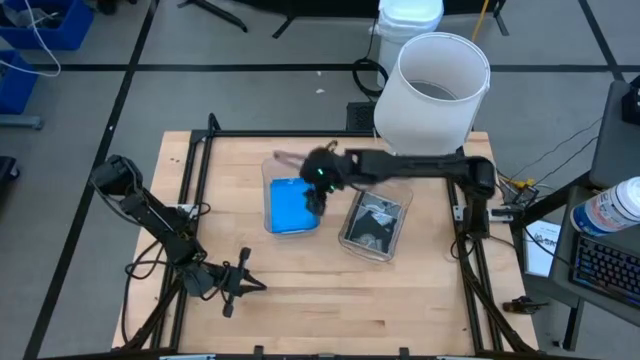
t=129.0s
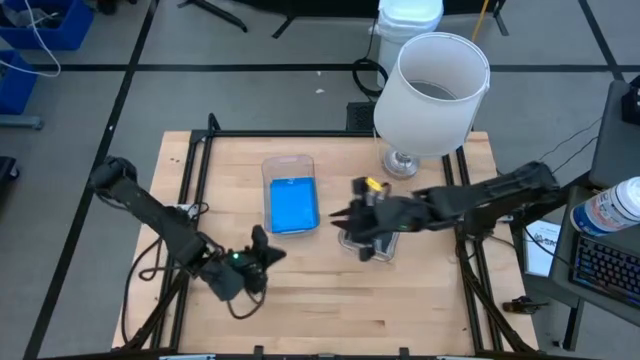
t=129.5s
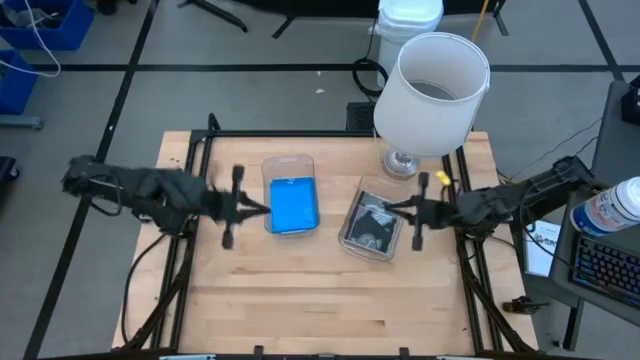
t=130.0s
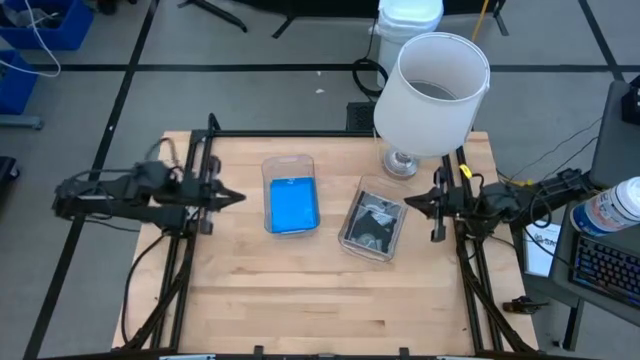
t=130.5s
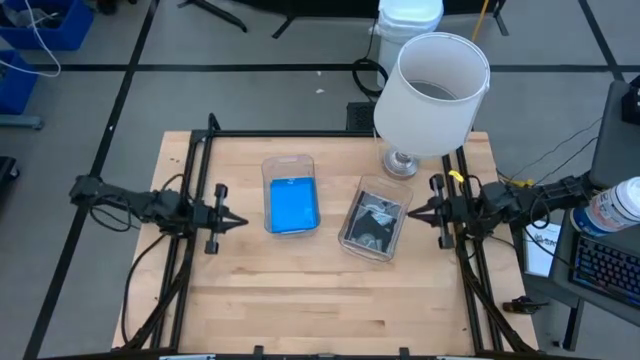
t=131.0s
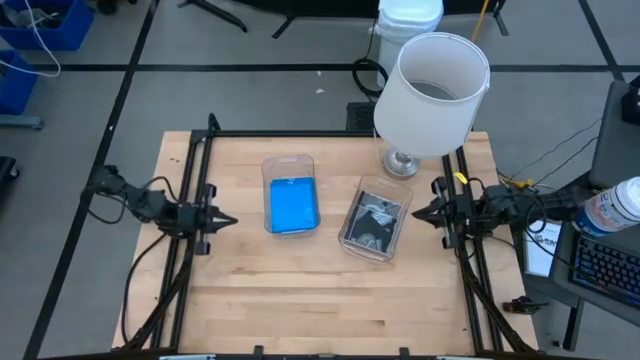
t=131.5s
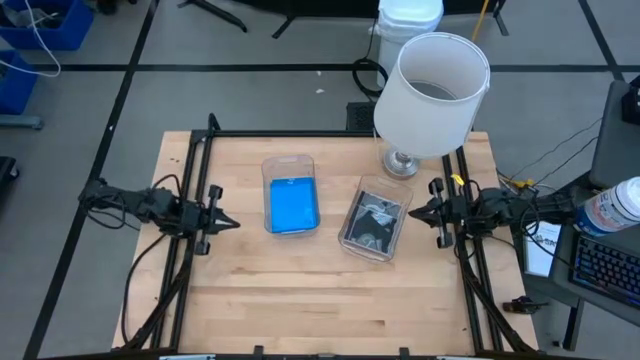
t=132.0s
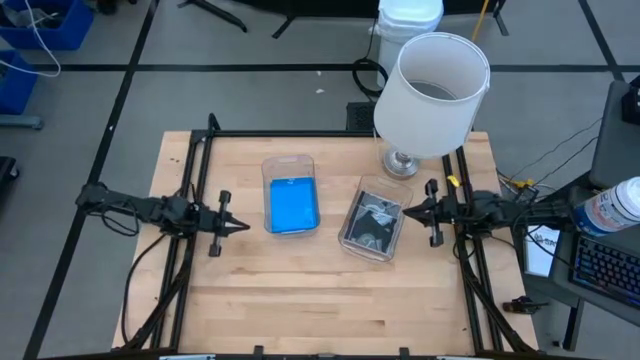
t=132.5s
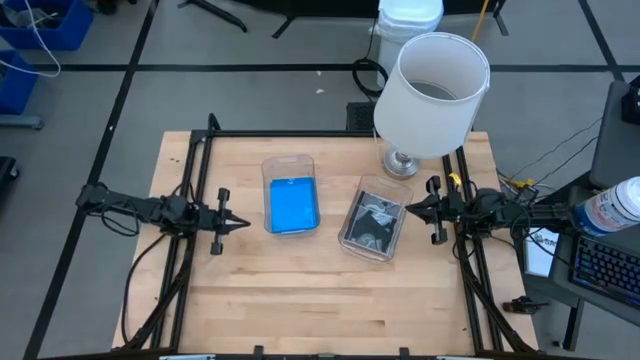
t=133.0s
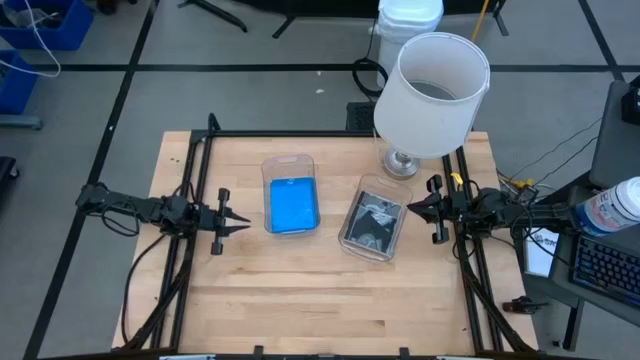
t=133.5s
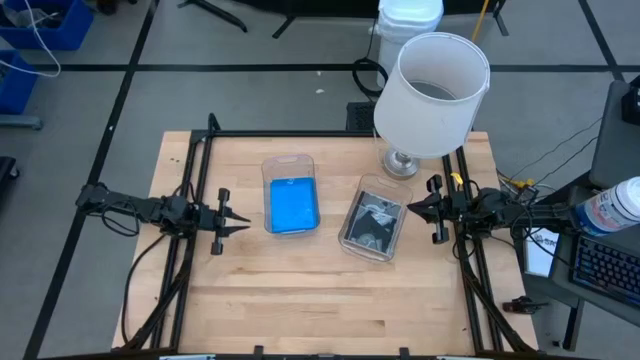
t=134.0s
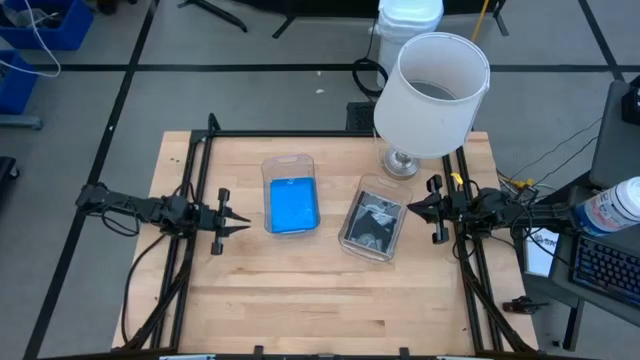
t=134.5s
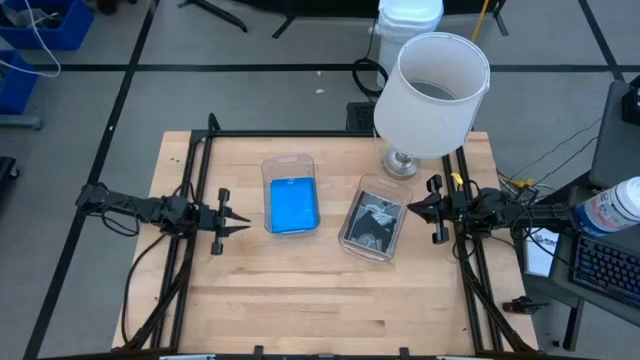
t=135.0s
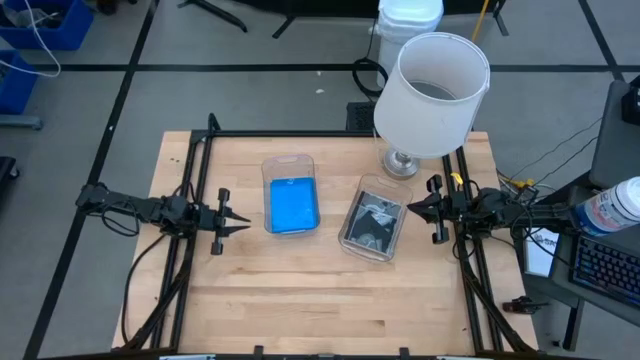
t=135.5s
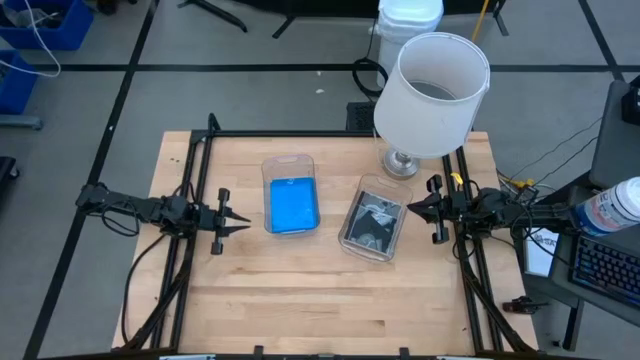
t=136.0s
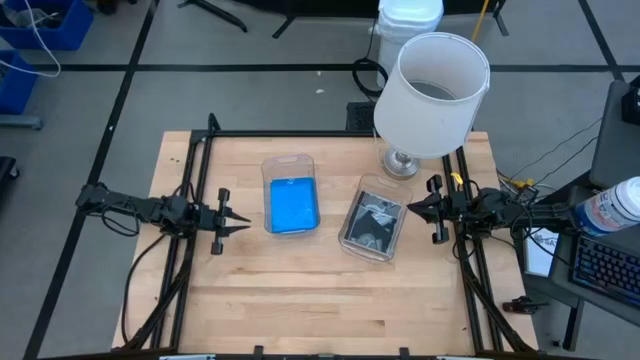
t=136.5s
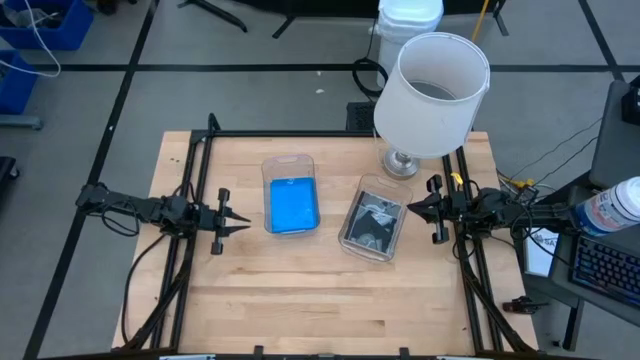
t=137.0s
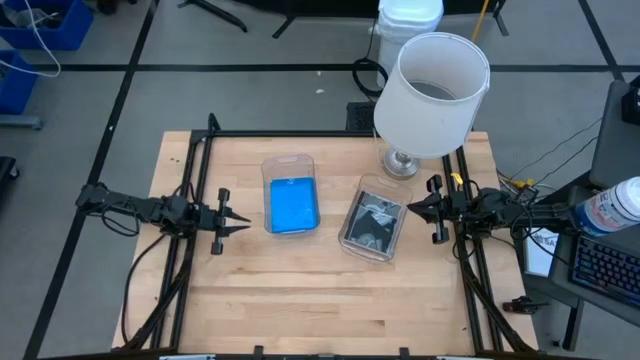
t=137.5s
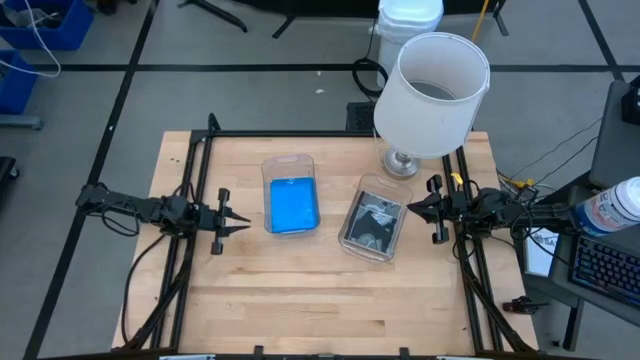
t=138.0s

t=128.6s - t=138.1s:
Task: Pick & place jewel cases by type
Return to Home Position

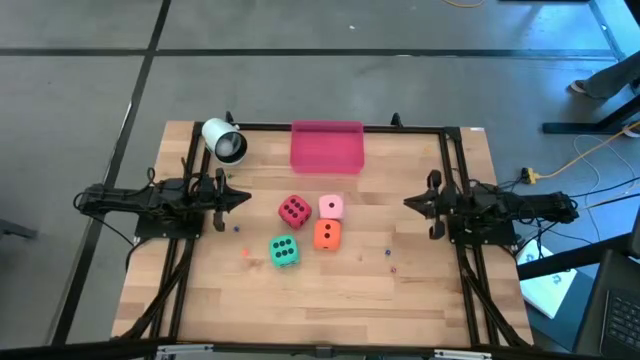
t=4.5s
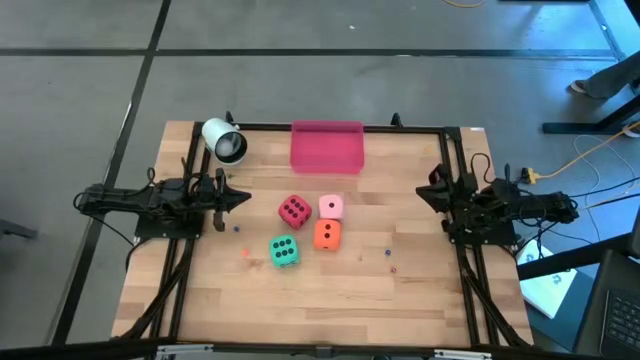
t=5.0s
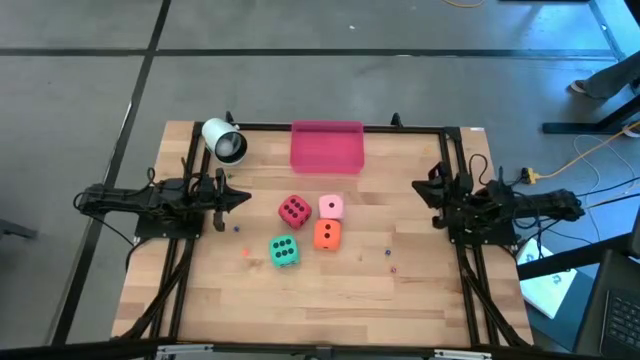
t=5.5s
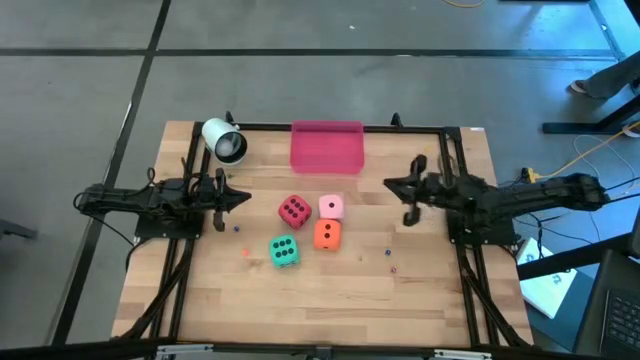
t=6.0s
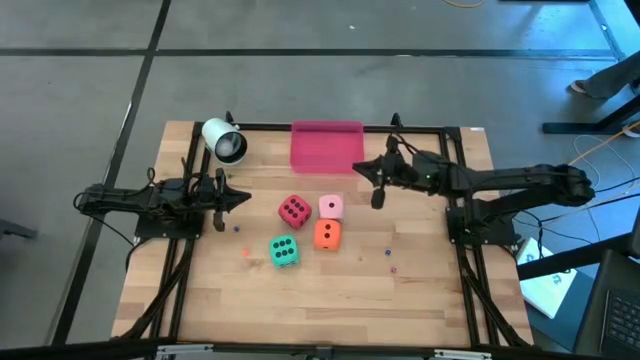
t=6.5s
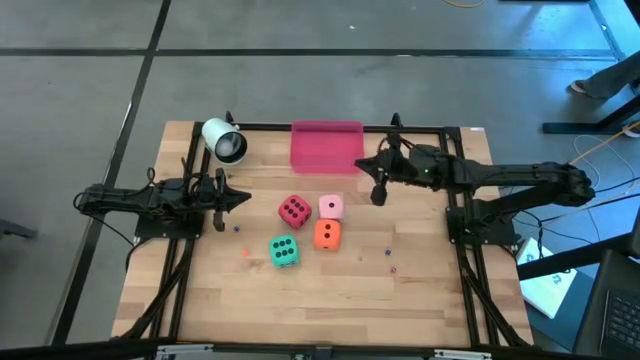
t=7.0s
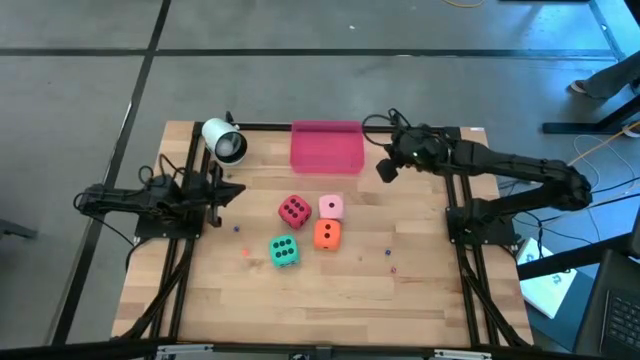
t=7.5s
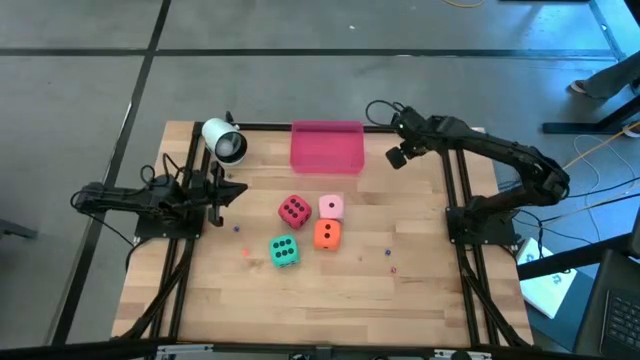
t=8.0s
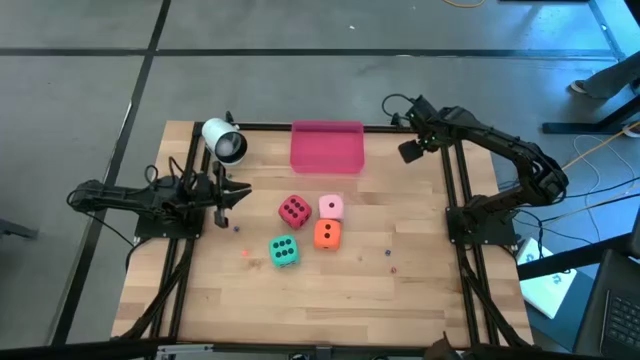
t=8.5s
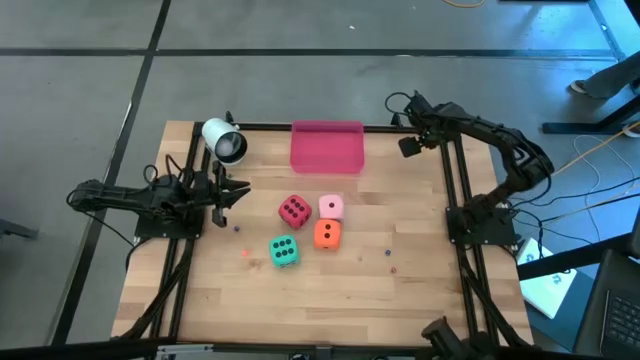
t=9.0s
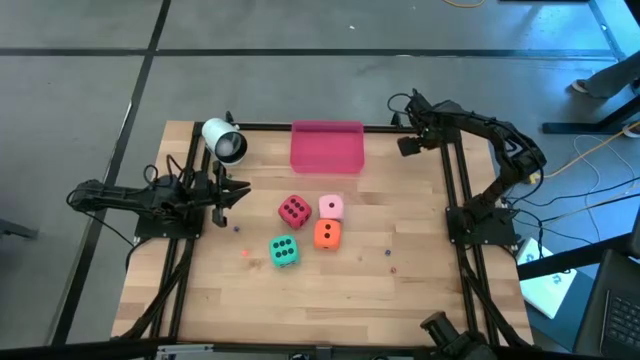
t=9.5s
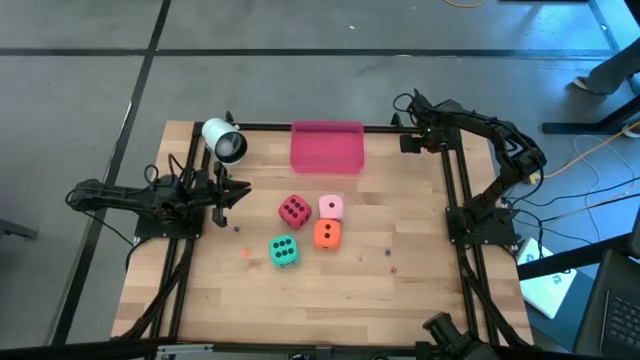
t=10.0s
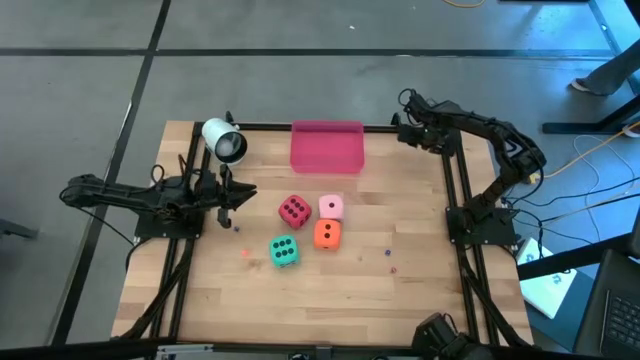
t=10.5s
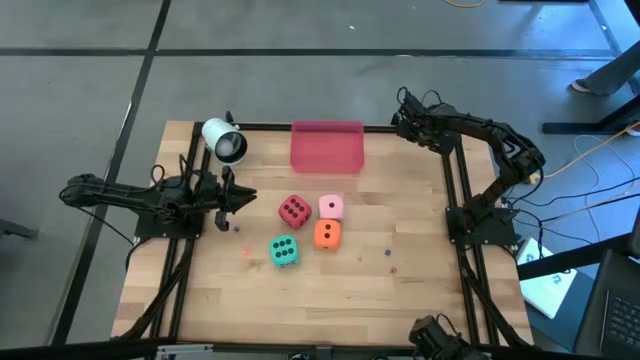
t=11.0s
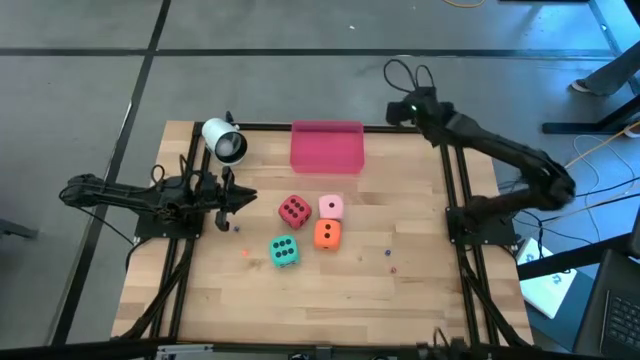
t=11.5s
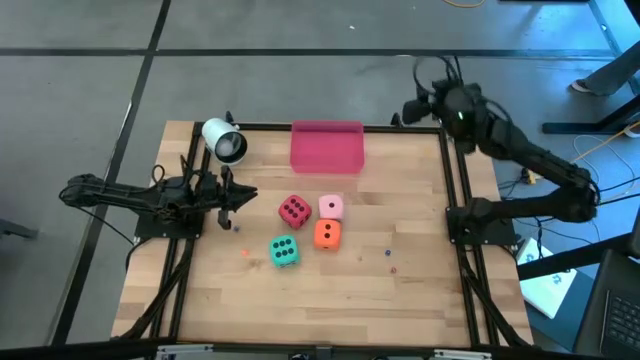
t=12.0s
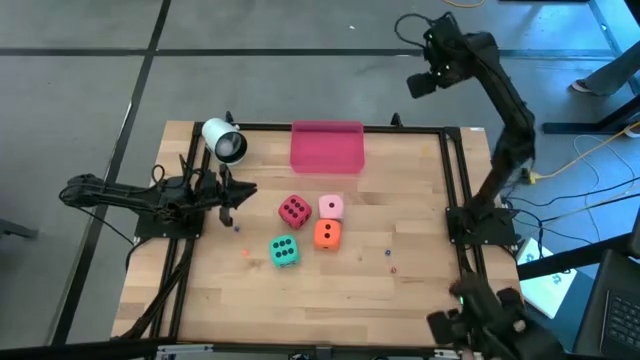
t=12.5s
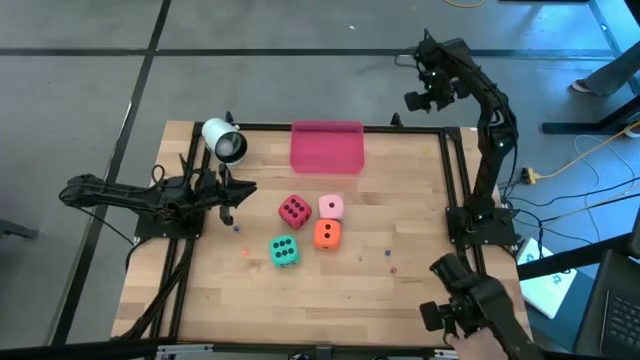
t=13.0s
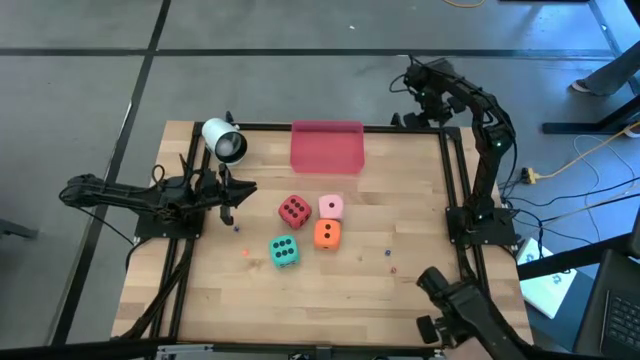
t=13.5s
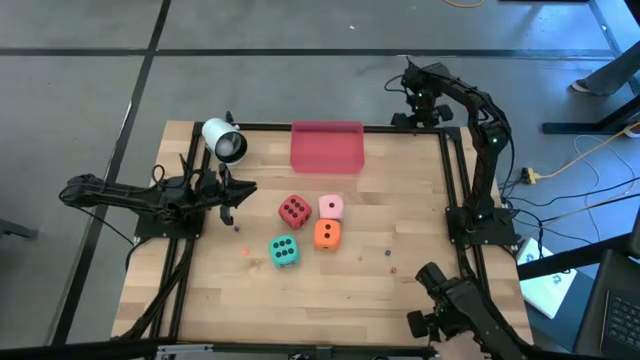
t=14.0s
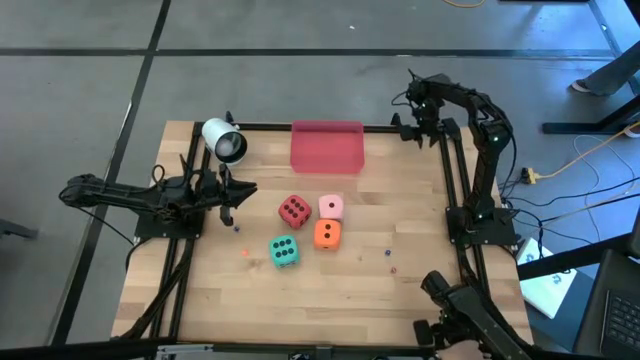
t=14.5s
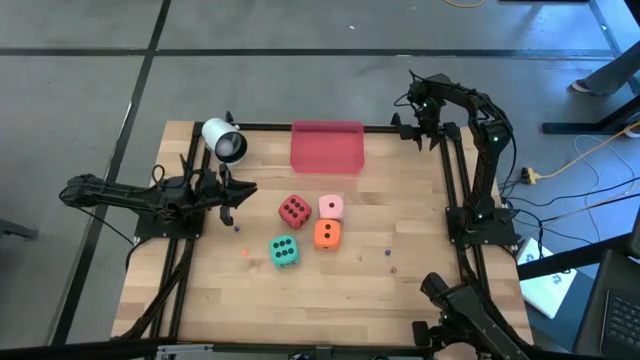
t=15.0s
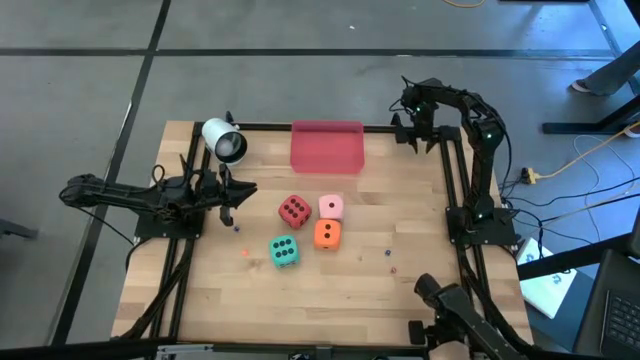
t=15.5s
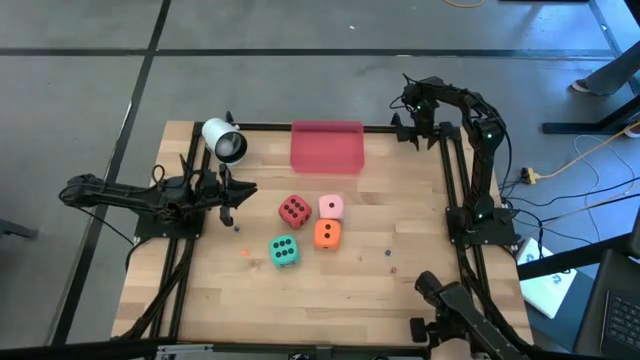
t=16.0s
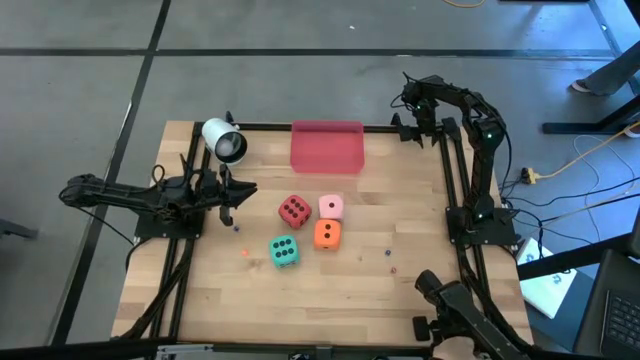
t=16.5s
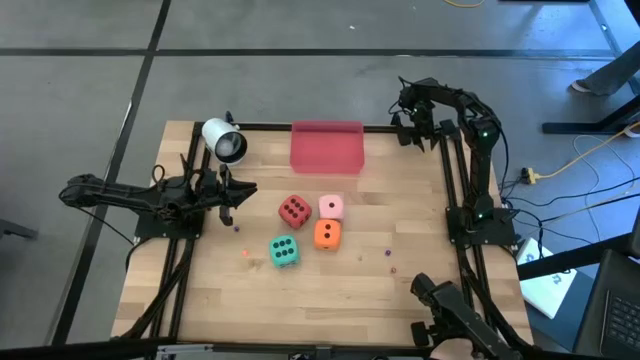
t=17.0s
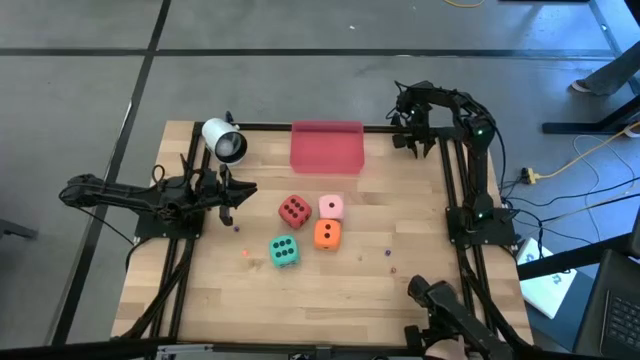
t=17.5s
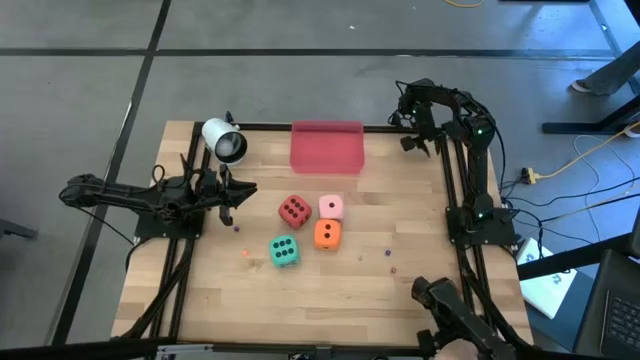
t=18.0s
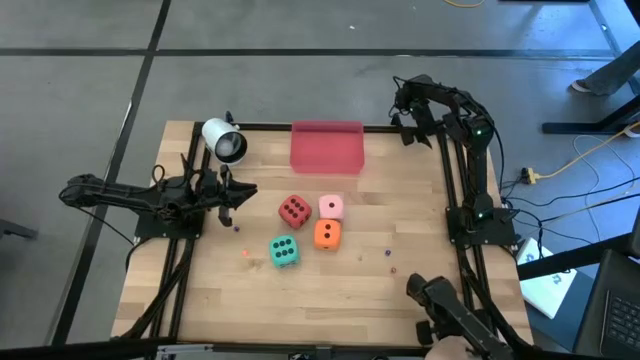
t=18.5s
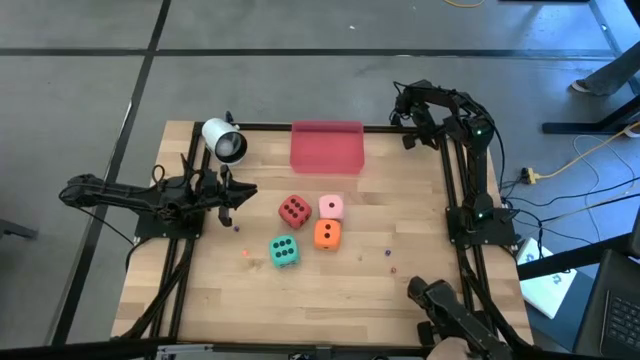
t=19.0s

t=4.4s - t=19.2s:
Task: Pick & Place Dice
Put the yellow die into the pink bin
